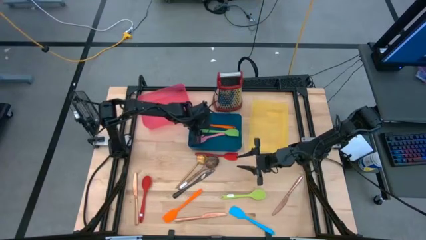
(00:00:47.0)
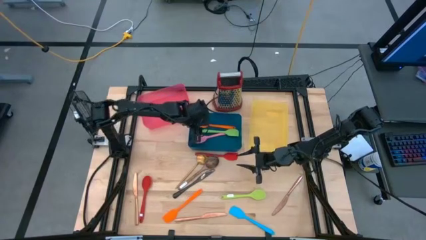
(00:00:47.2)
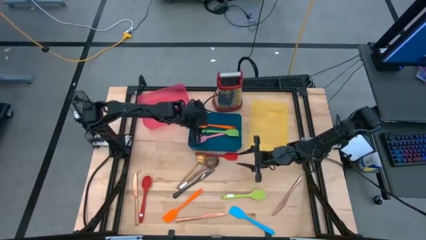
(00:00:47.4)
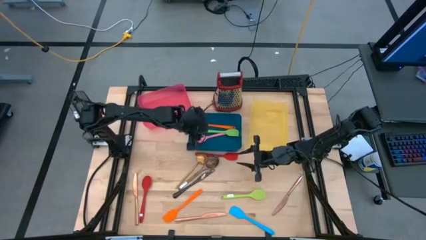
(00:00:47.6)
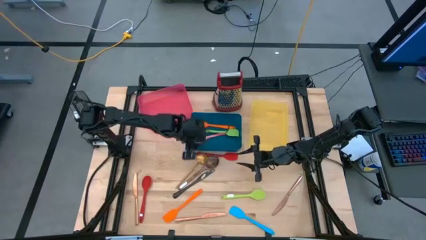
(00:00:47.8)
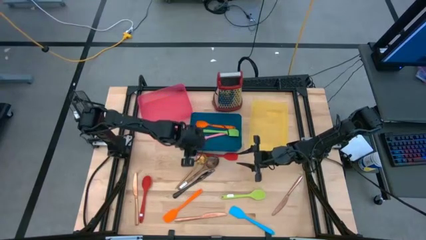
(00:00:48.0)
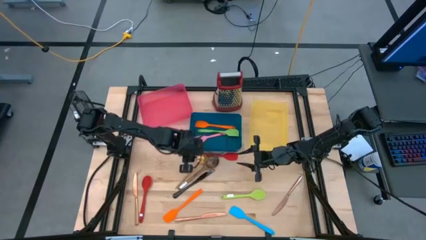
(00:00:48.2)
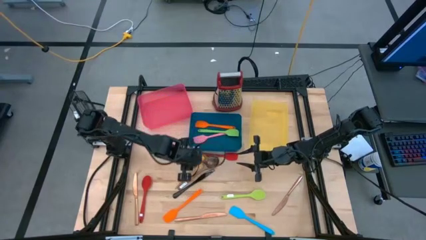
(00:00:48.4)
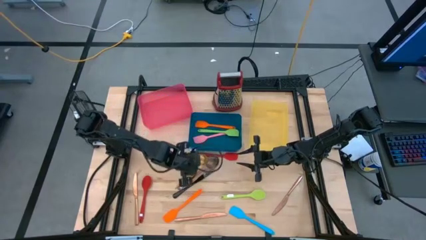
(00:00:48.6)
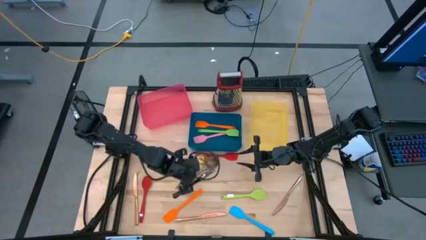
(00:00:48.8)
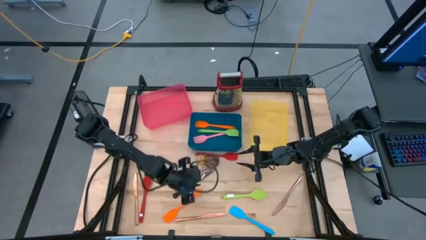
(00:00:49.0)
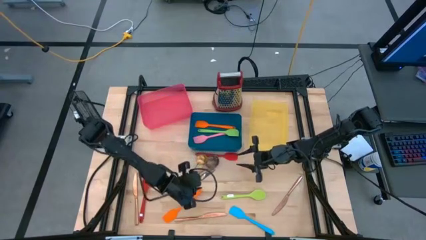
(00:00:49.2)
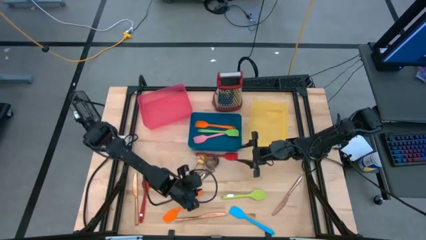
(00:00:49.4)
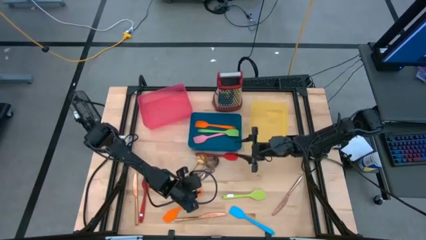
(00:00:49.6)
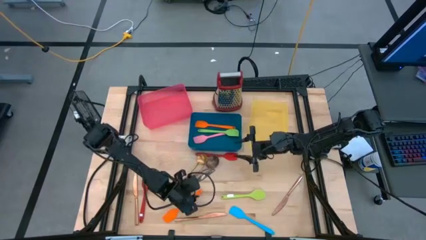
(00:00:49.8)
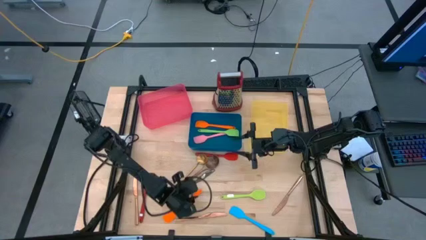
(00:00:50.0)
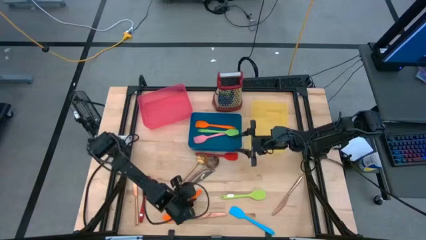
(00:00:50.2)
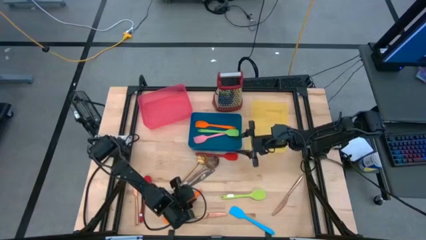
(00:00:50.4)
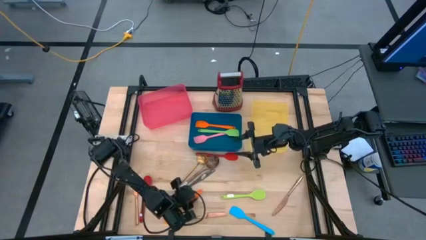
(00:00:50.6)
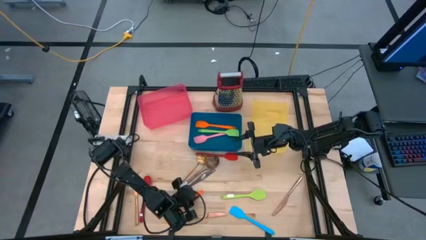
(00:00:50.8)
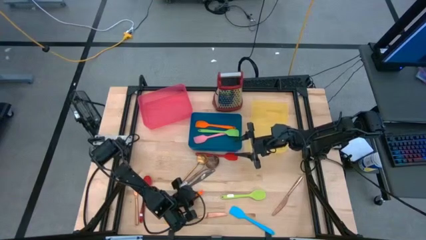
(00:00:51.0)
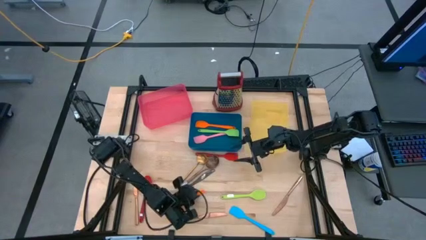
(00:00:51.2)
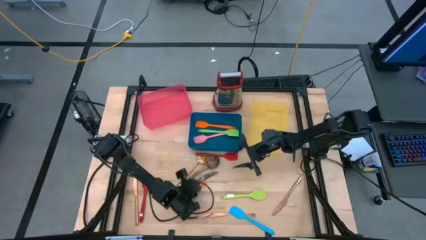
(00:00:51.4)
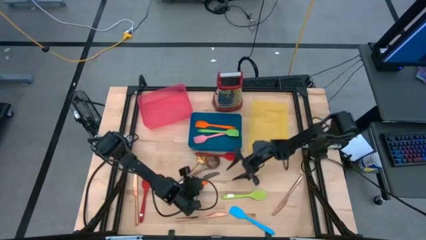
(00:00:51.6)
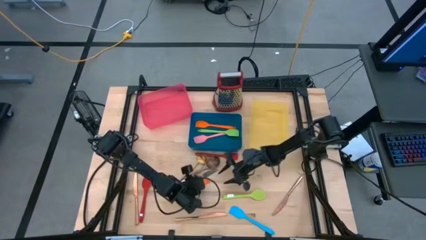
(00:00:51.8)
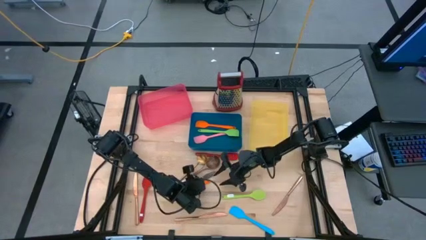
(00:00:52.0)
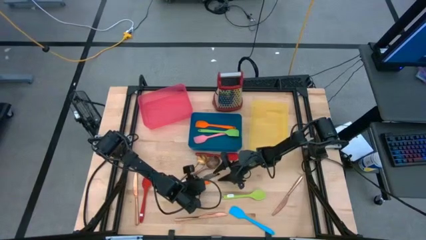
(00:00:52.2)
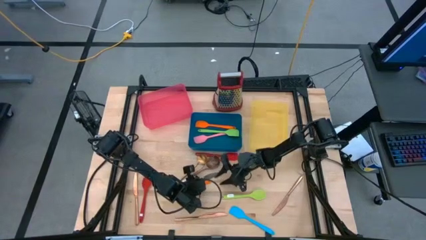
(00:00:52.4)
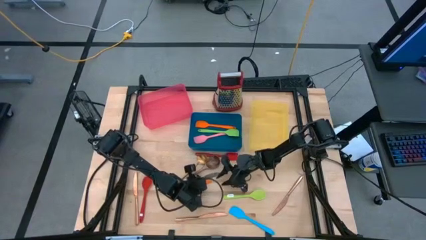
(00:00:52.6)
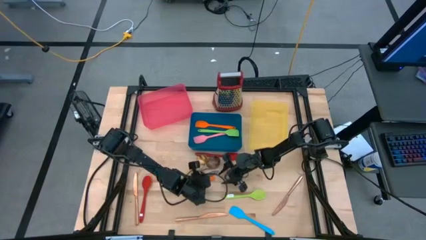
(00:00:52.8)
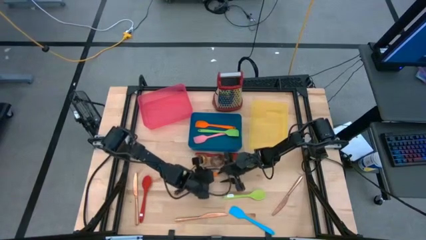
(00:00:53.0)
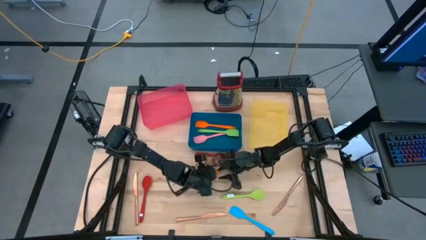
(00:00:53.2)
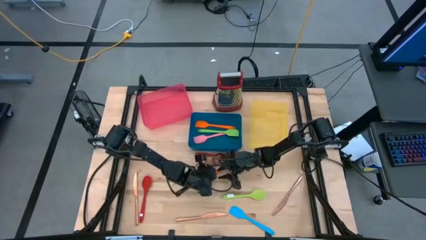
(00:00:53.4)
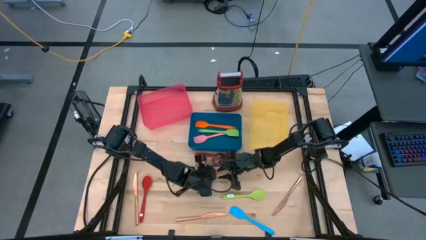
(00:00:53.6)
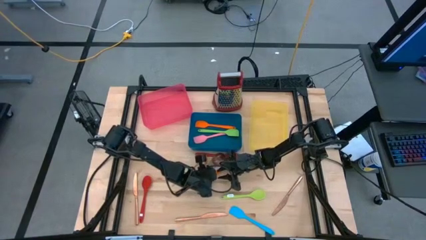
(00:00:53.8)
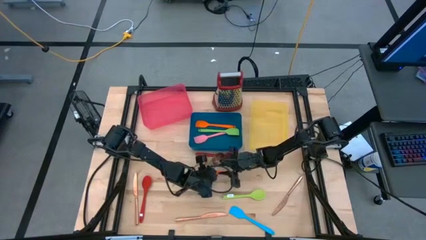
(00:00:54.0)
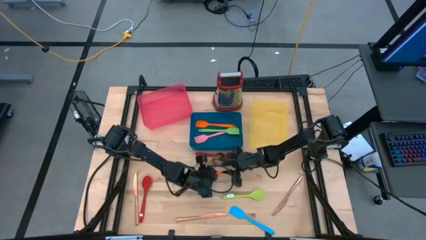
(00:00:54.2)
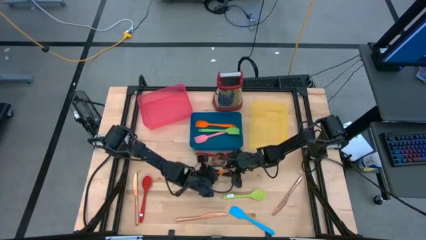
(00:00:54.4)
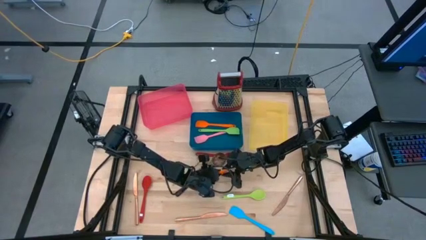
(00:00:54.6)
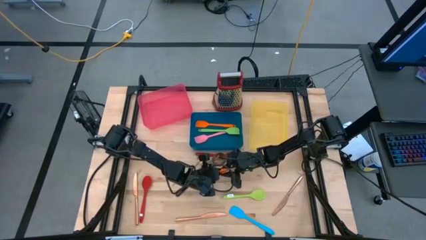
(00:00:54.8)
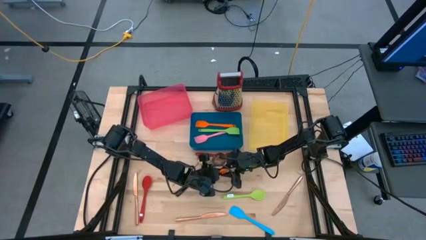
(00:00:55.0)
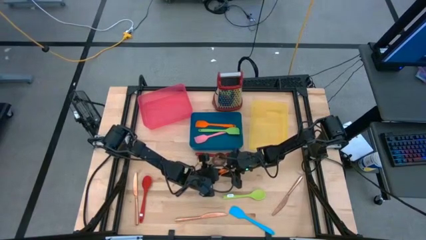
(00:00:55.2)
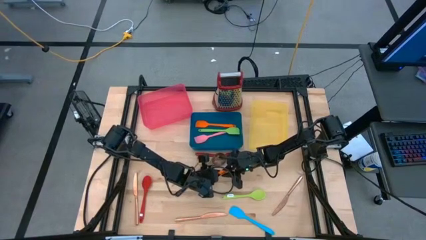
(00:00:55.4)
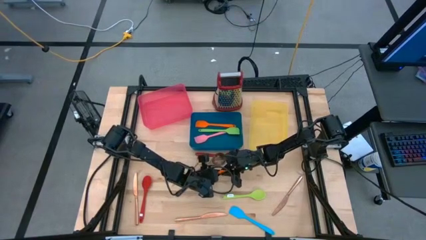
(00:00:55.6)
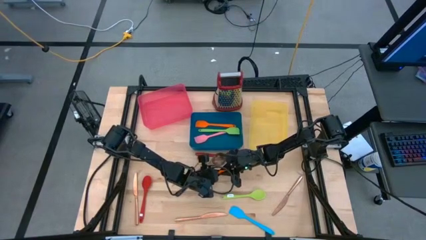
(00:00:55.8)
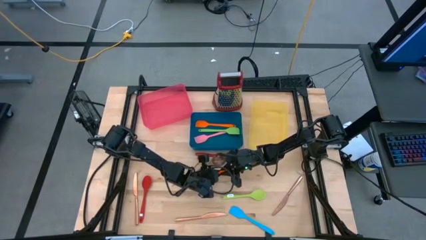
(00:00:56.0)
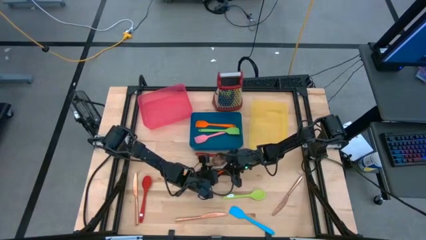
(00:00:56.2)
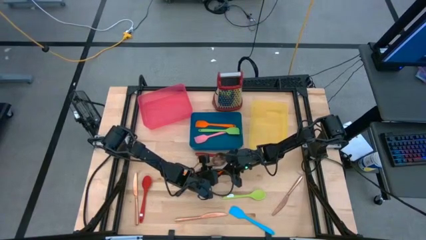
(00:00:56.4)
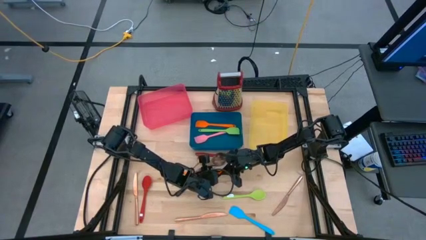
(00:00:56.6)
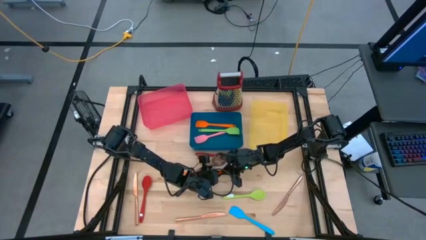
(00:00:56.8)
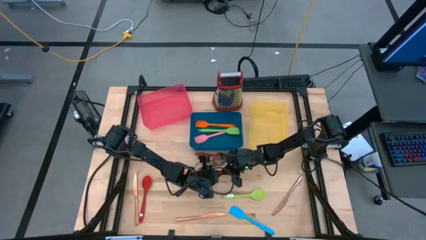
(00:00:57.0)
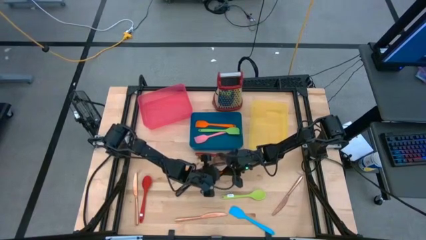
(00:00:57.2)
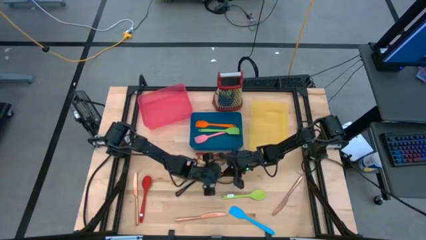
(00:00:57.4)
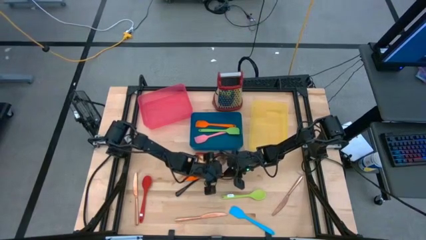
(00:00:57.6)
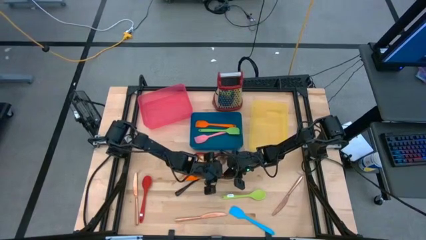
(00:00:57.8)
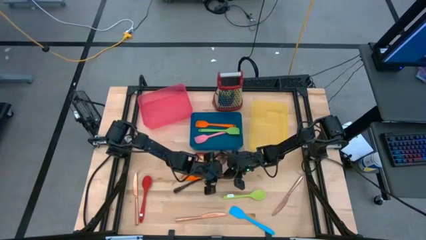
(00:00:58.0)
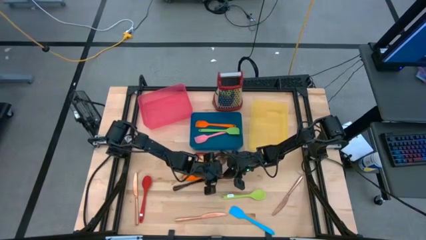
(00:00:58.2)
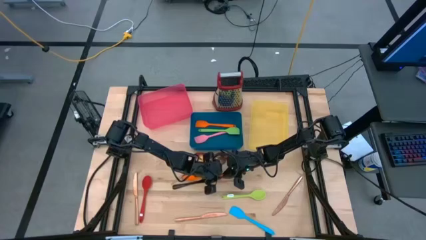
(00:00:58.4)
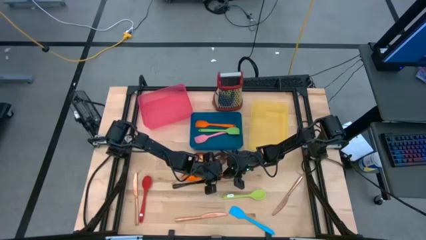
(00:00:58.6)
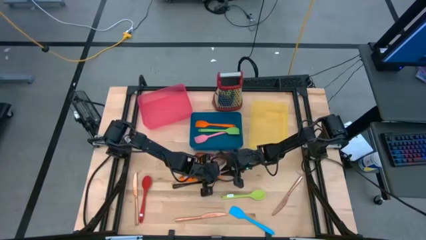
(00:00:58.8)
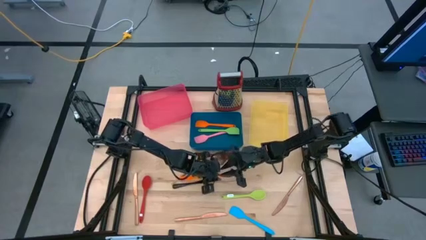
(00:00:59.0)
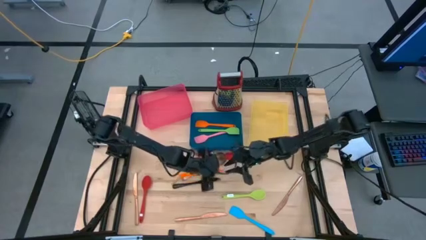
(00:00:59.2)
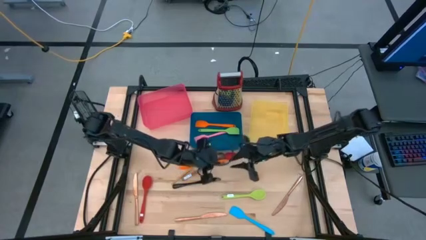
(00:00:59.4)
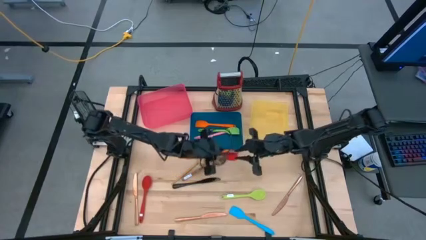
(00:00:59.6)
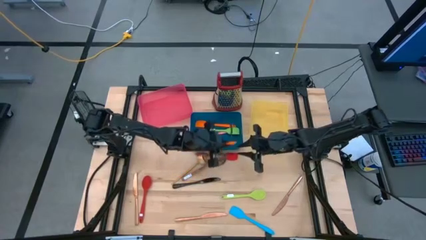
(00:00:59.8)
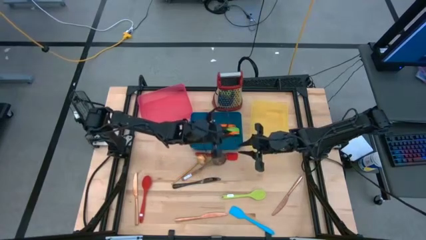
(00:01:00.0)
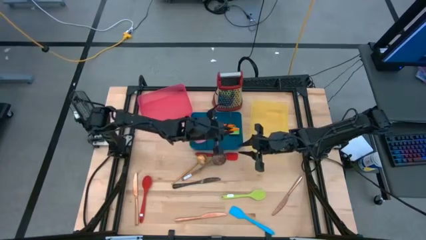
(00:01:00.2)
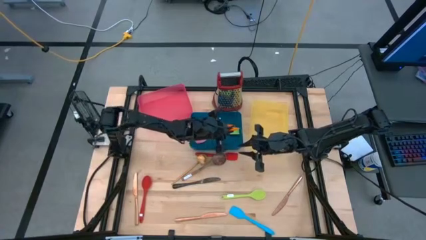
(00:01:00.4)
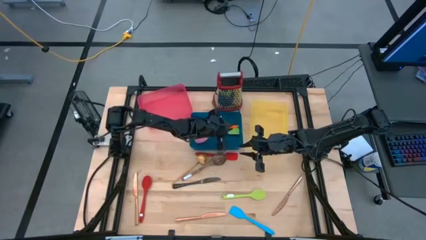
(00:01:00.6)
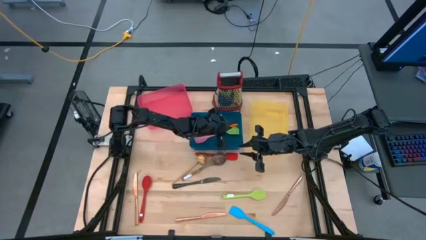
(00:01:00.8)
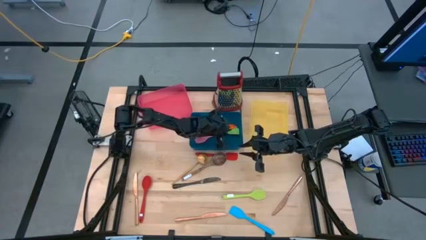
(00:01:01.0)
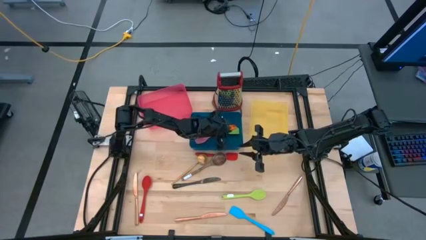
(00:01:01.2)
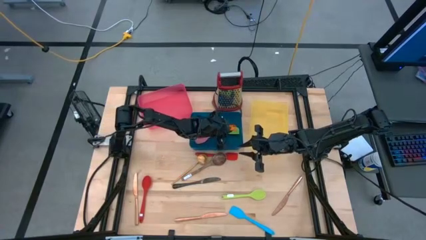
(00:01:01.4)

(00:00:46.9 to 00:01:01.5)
Task: Pick & Place Kitchen Items
Put the orange spatula into the blue bin
